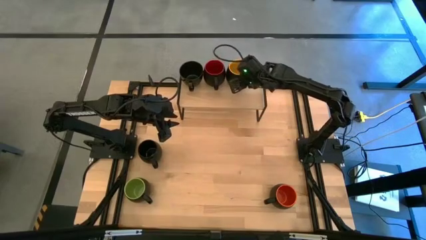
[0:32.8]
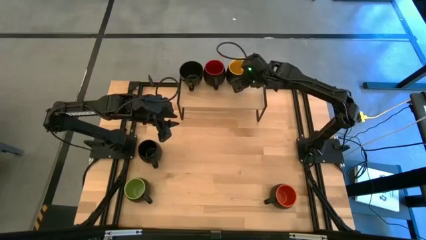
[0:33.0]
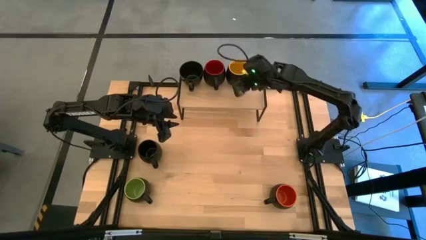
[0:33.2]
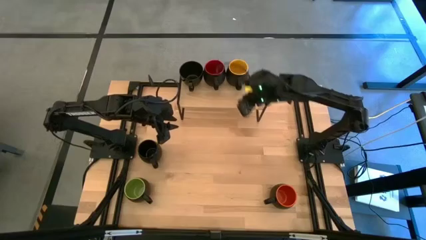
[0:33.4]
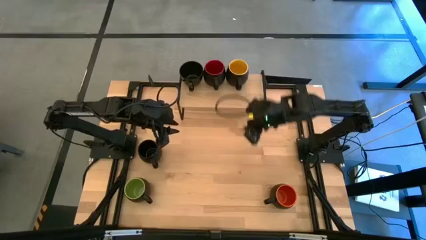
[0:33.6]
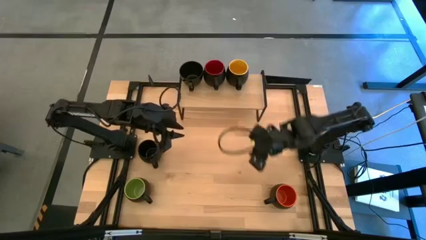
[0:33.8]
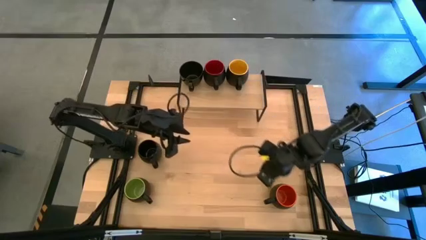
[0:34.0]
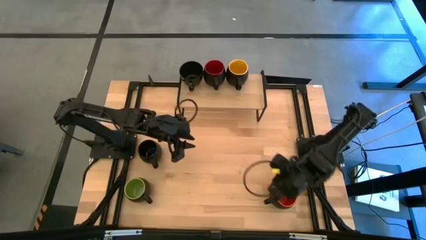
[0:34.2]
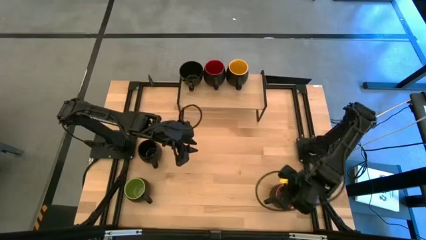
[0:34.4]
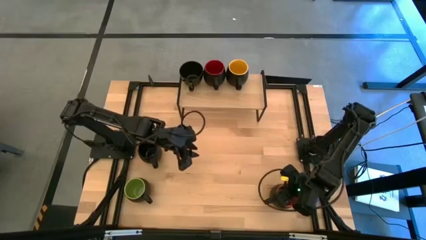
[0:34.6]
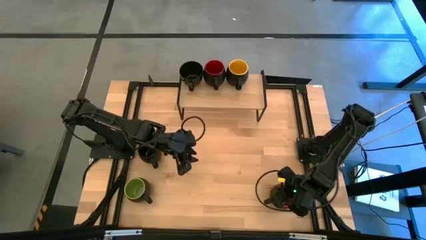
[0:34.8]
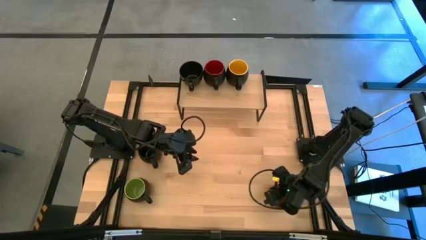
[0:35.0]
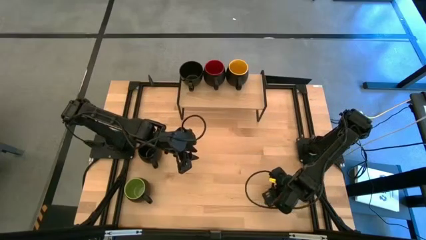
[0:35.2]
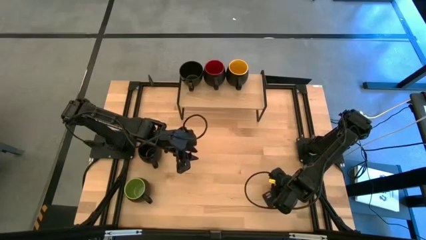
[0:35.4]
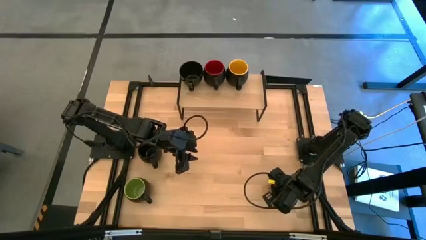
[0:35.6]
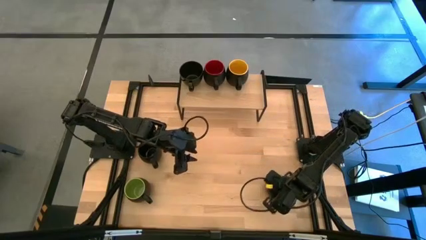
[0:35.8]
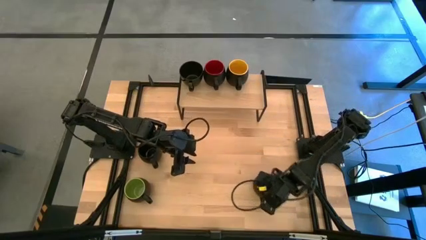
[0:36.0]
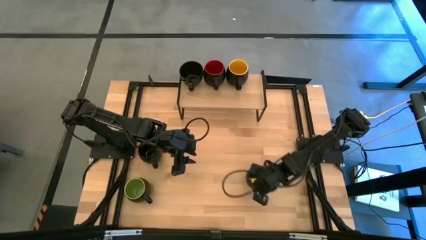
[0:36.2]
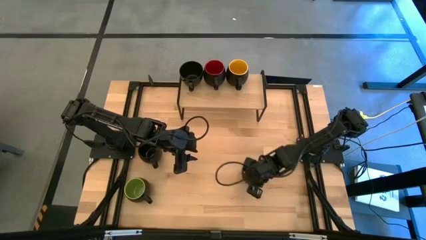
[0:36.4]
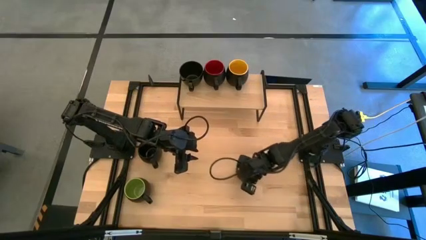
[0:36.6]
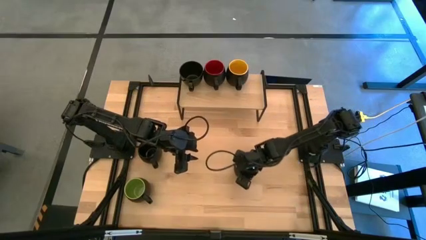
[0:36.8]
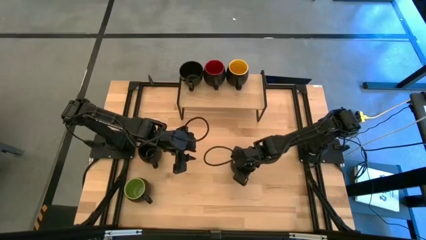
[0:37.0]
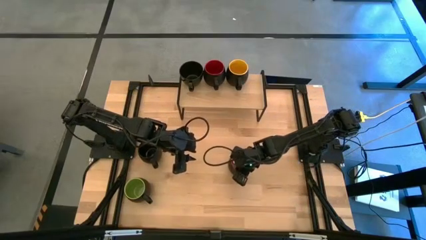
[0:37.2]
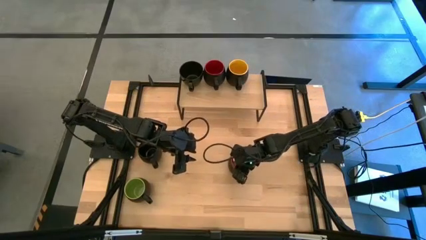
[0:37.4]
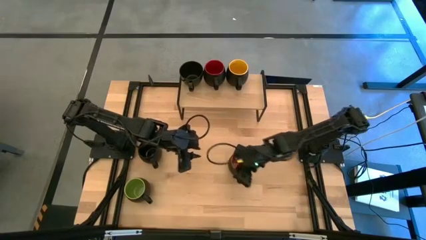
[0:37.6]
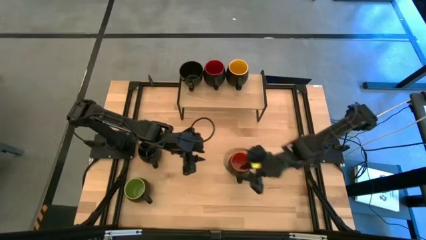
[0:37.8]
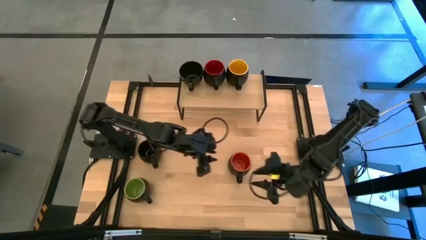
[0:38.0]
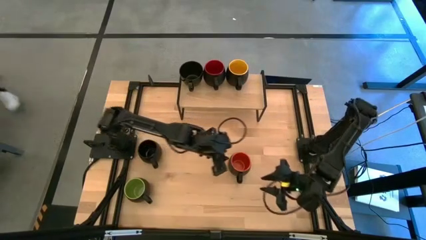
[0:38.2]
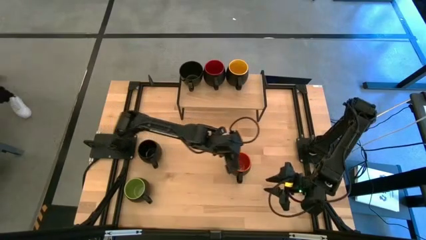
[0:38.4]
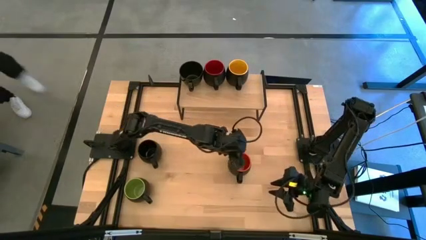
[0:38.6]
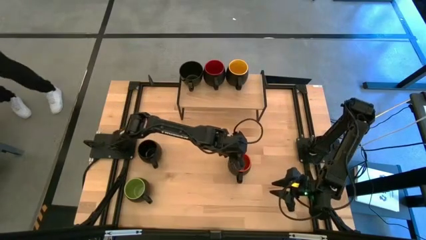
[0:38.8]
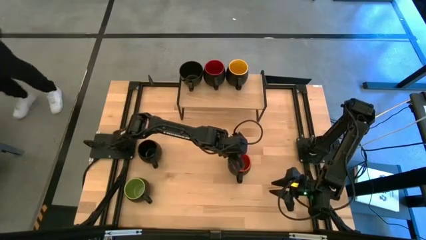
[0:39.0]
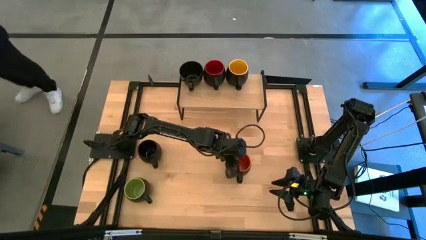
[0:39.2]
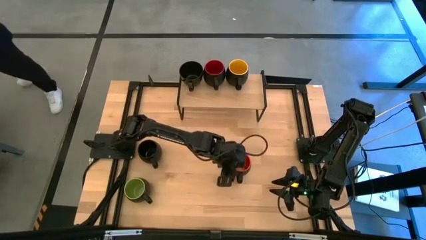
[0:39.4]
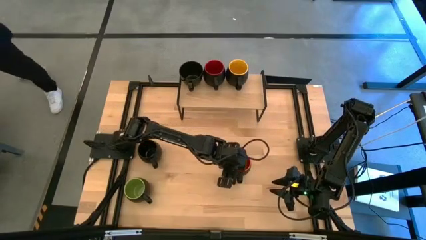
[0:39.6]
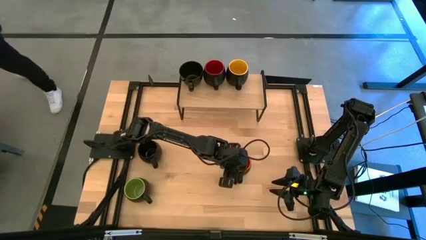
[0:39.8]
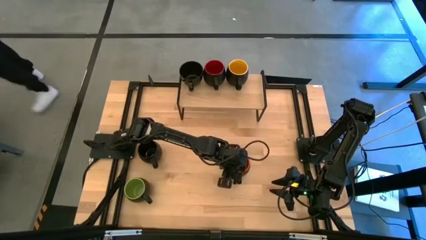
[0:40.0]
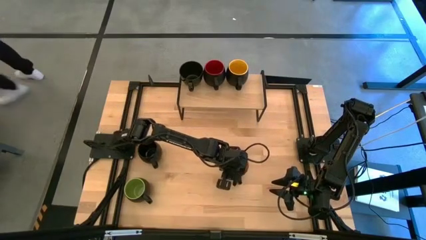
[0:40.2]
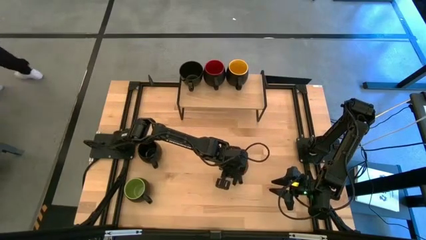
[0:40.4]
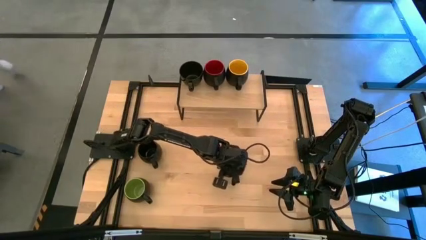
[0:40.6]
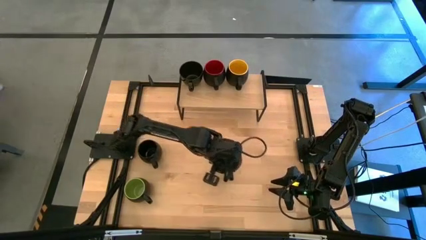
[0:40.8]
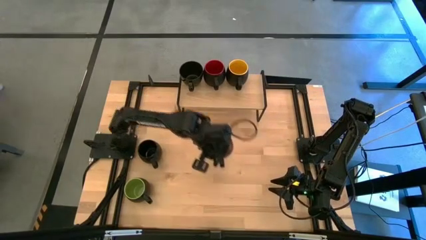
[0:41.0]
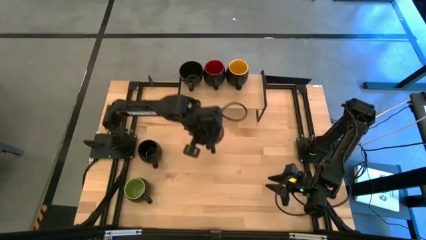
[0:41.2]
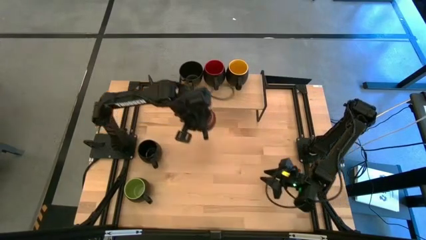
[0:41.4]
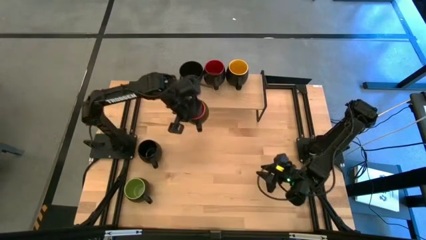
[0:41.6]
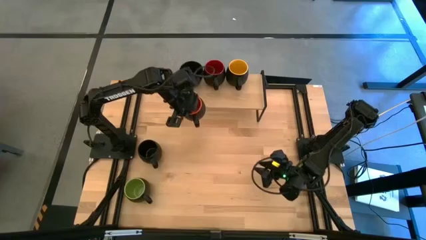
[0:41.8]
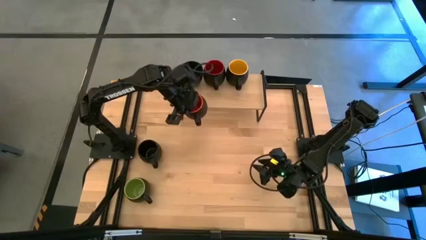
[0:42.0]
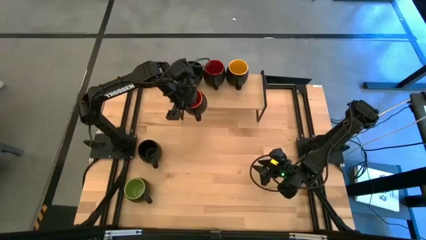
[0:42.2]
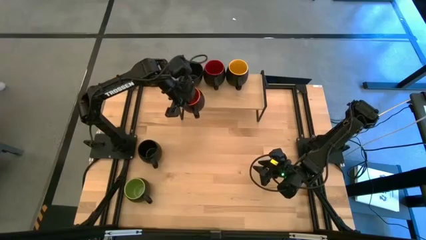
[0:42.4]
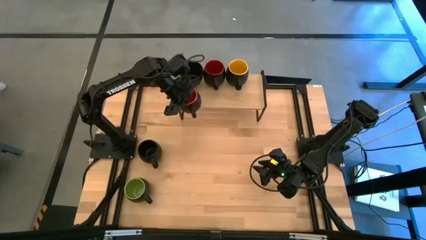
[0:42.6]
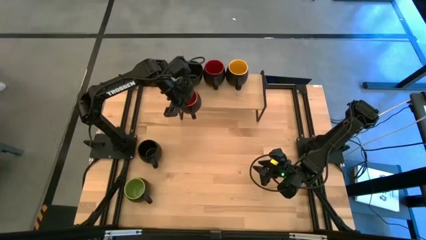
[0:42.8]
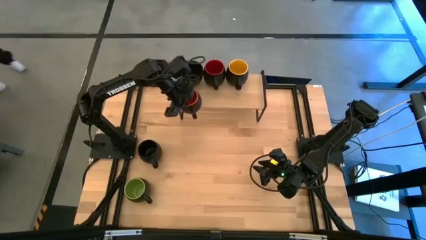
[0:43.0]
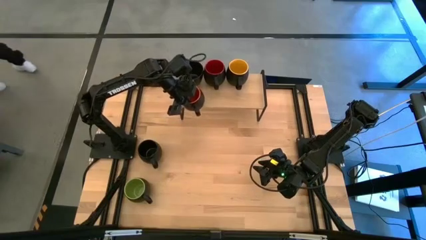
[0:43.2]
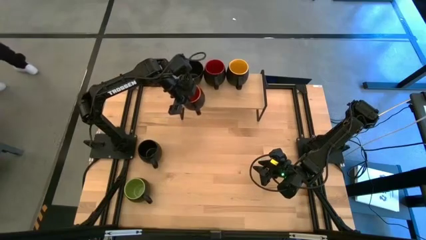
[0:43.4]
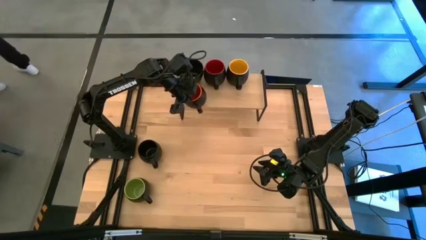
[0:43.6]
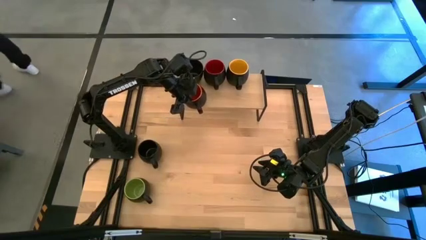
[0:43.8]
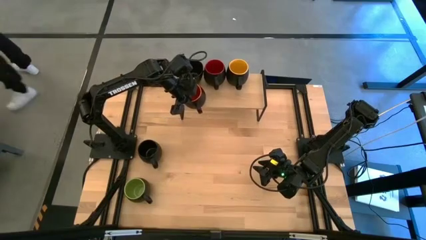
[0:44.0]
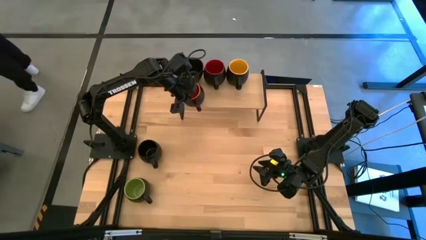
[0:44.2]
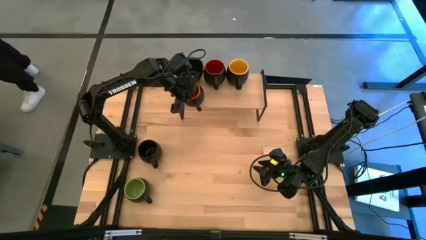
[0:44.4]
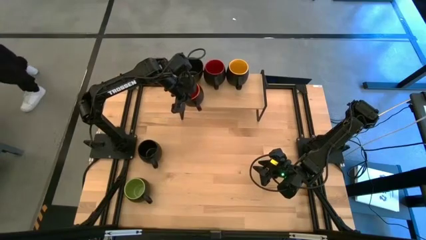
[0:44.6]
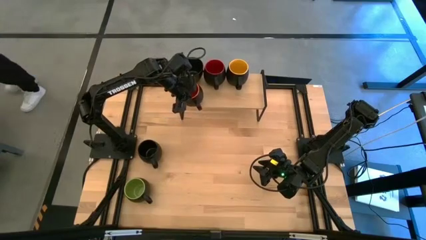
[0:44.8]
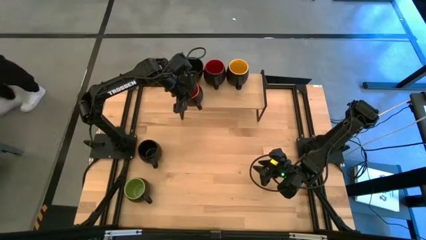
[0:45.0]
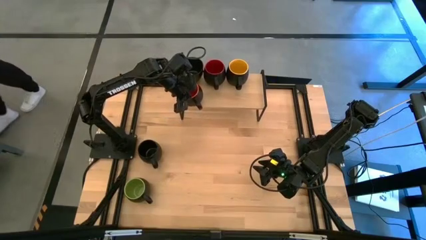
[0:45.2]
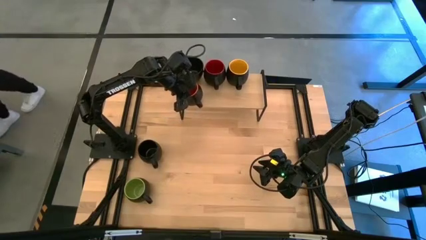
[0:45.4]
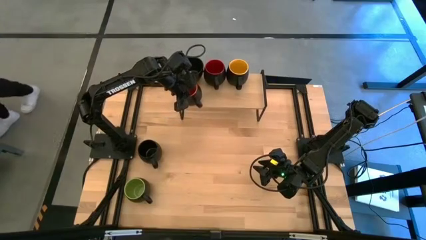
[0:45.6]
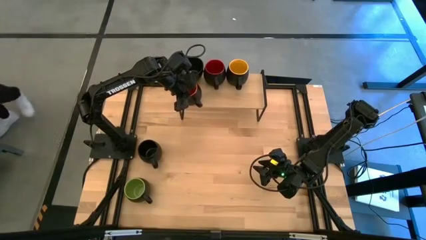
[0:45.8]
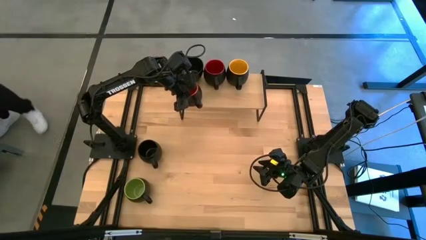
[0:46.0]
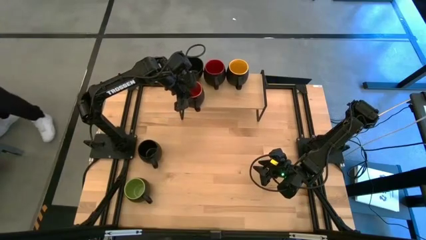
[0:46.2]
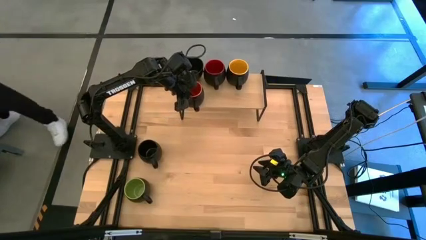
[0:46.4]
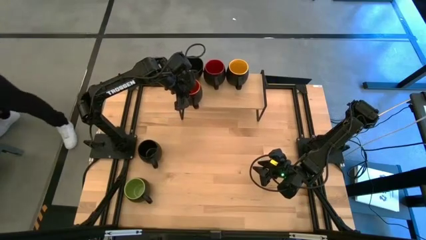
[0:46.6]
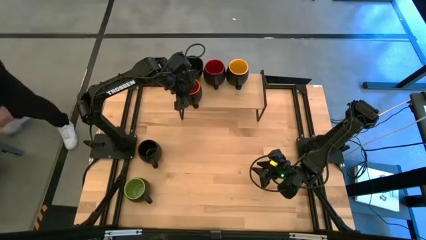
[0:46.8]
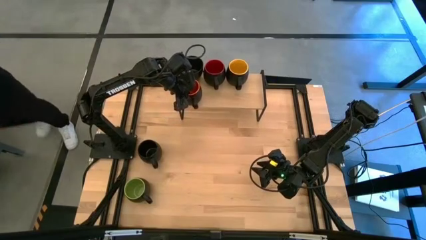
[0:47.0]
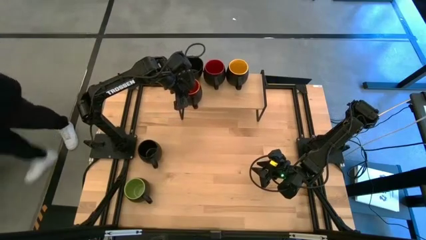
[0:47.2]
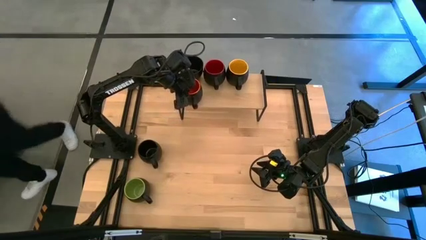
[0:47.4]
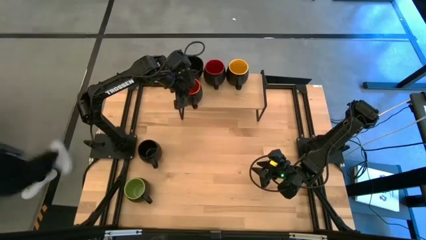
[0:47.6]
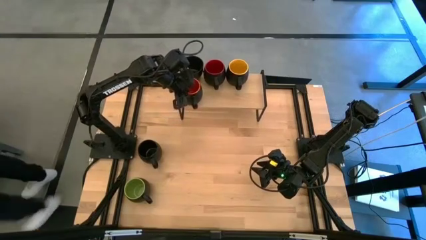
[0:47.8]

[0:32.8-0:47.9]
Task: Place coffee mugs
Put the orange mug on the shelf

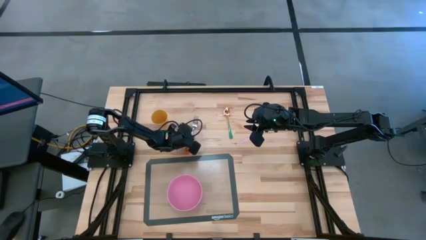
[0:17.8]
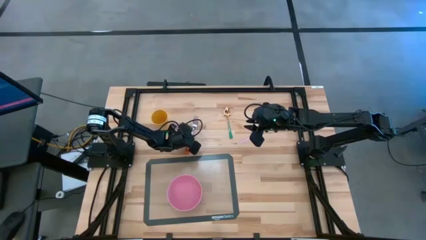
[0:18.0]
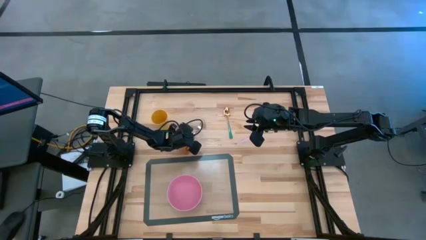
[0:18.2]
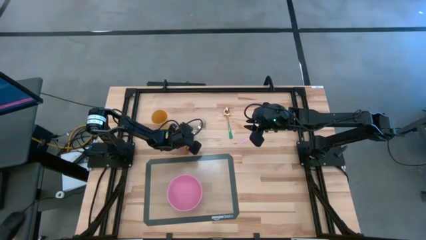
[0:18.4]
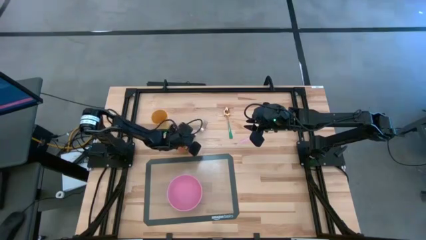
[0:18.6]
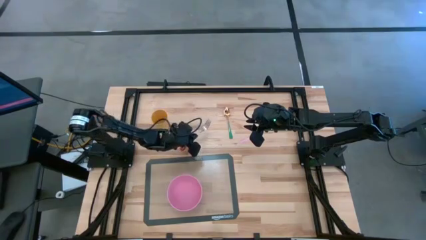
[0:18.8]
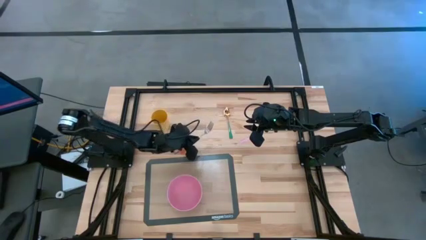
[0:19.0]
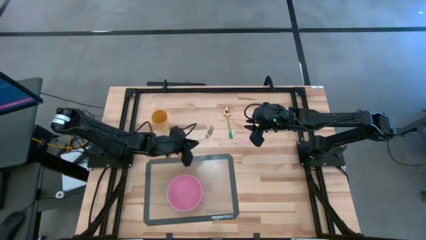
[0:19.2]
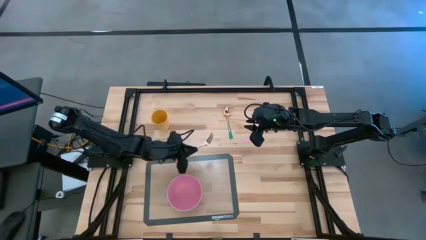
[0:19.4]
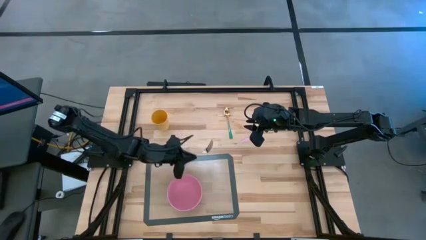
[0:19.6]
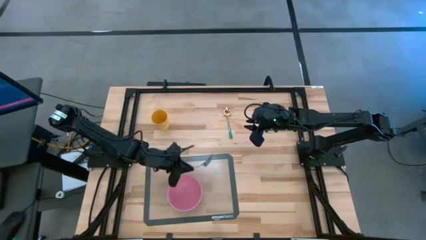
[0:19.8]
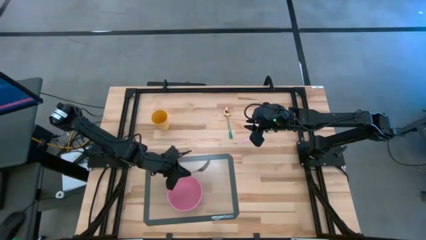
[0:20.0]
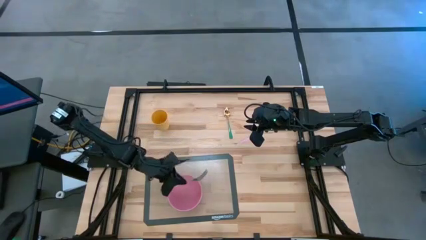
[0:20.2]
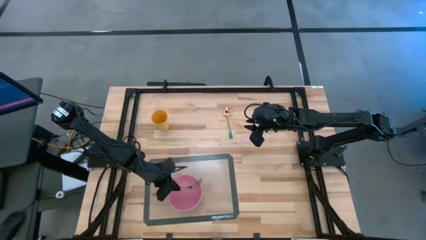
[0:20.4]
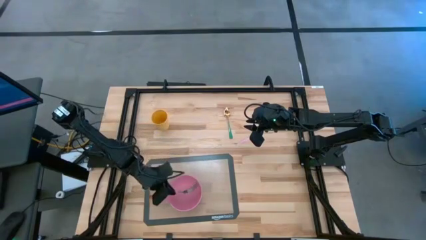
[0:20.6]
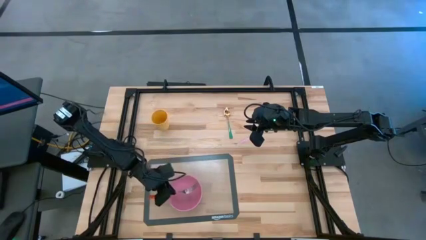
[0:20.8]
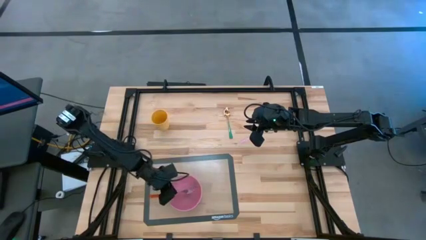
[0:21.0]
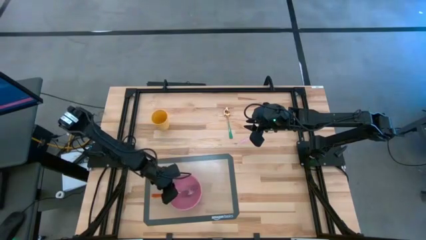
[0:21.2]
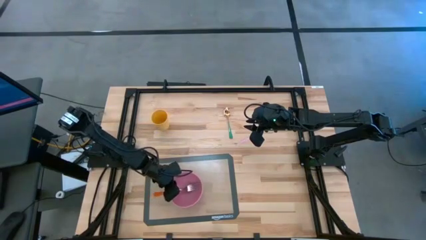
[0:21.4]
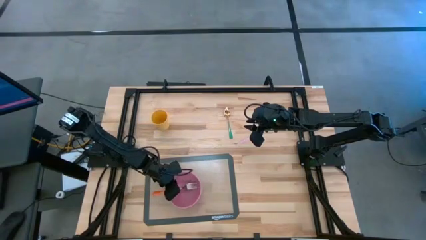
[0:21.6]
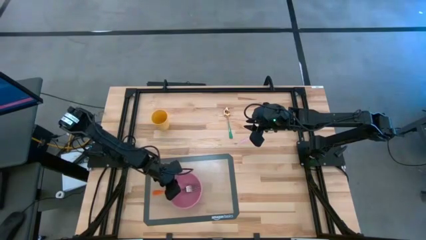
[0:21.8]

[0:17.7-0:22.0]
Task: Pick & Place Utensil
Put the orange fork into the pink bowl
